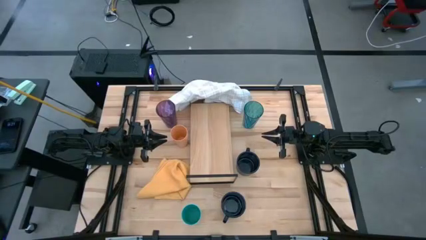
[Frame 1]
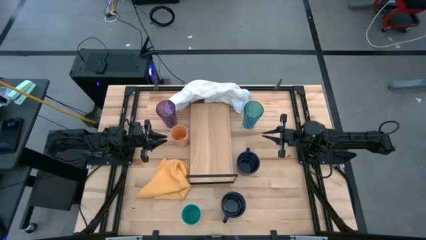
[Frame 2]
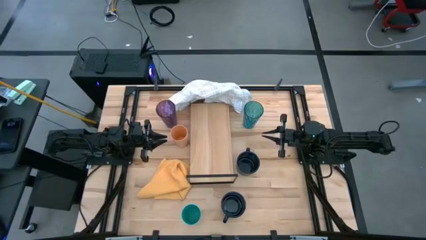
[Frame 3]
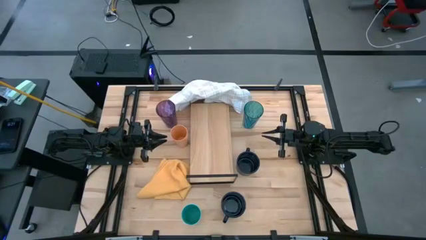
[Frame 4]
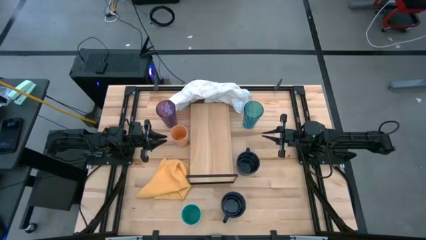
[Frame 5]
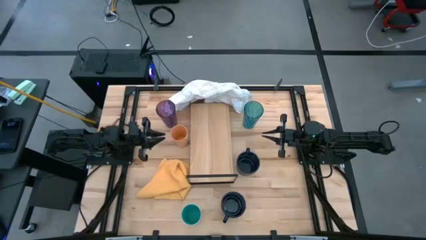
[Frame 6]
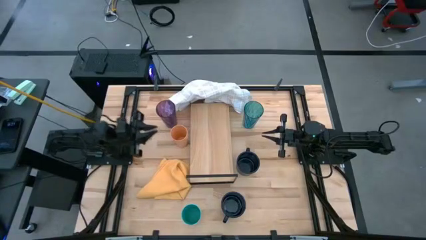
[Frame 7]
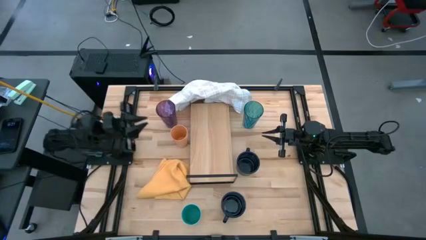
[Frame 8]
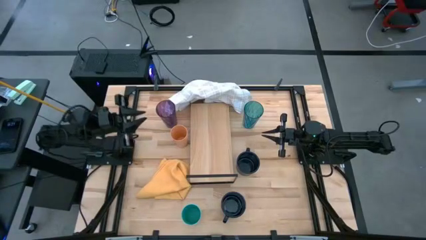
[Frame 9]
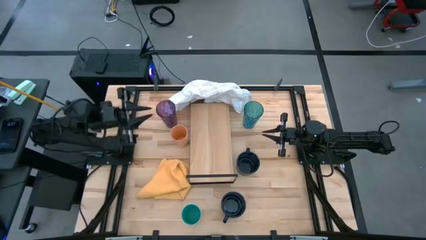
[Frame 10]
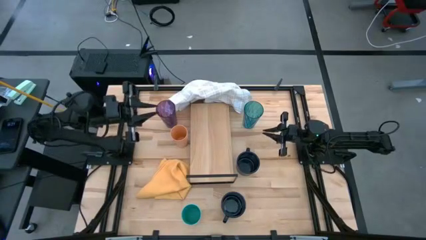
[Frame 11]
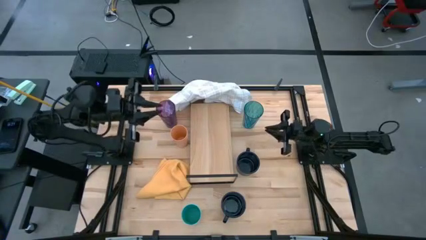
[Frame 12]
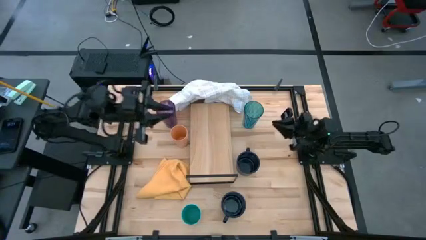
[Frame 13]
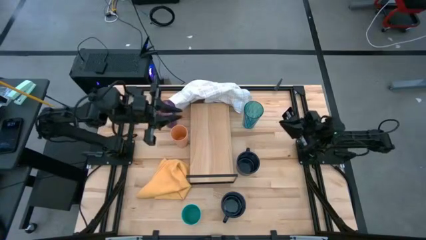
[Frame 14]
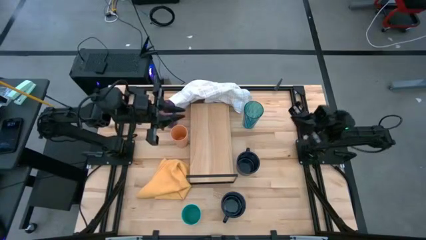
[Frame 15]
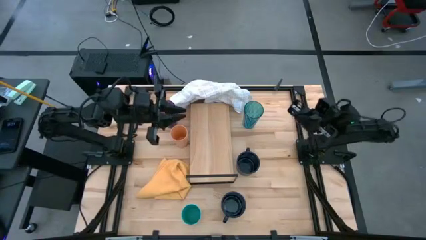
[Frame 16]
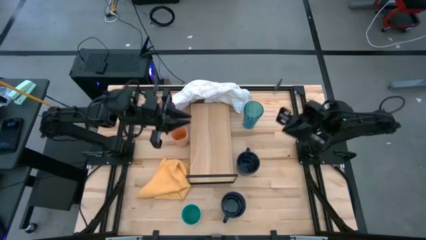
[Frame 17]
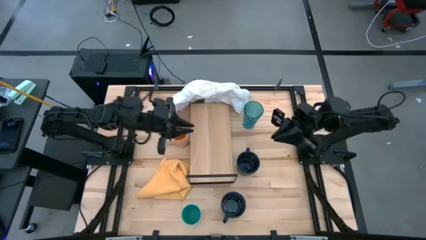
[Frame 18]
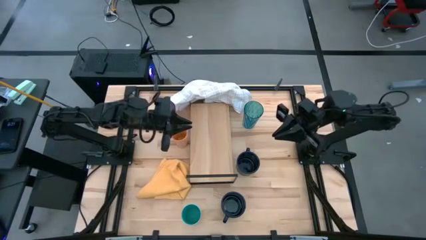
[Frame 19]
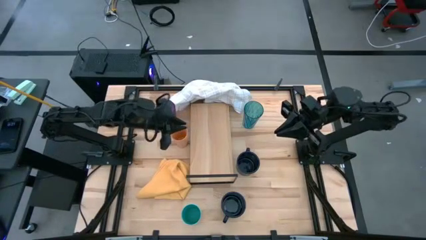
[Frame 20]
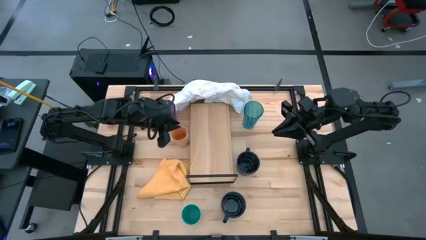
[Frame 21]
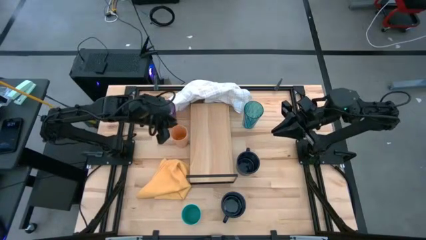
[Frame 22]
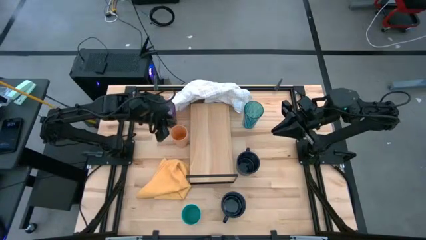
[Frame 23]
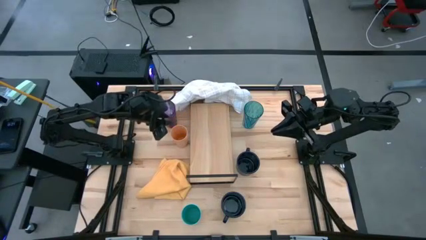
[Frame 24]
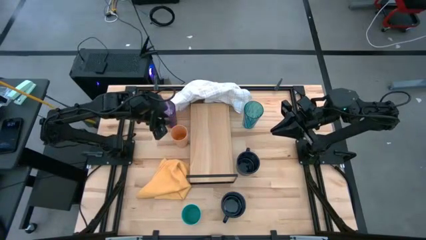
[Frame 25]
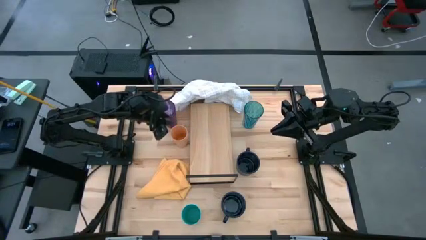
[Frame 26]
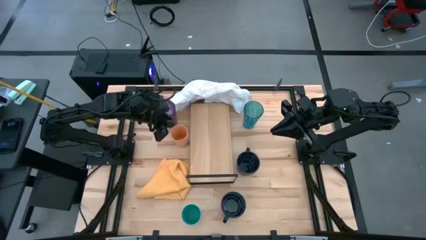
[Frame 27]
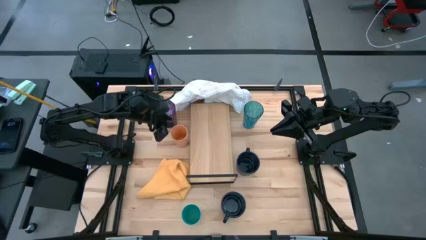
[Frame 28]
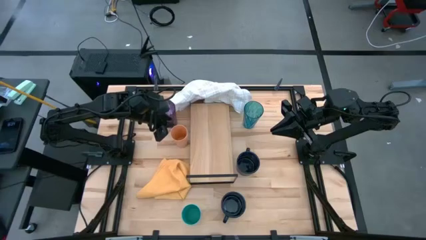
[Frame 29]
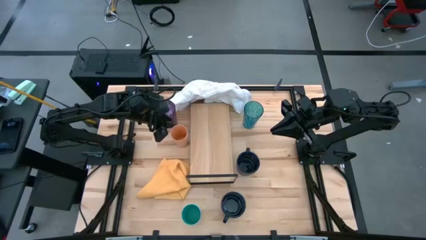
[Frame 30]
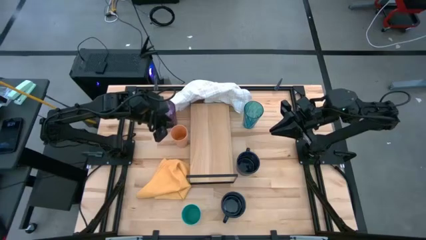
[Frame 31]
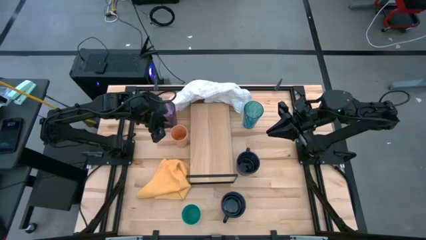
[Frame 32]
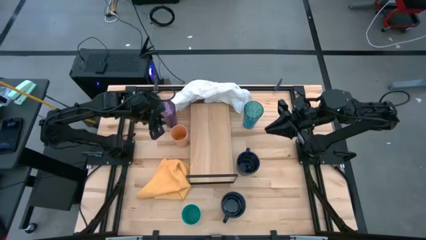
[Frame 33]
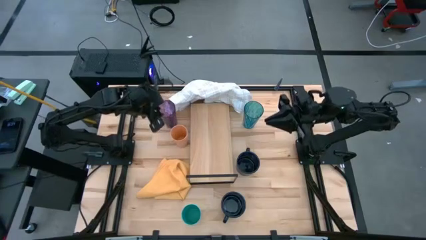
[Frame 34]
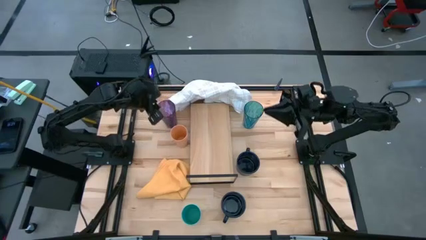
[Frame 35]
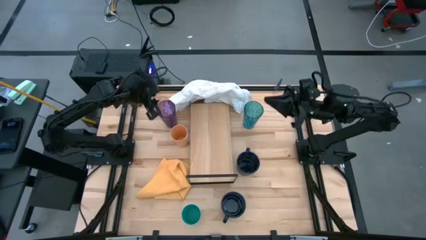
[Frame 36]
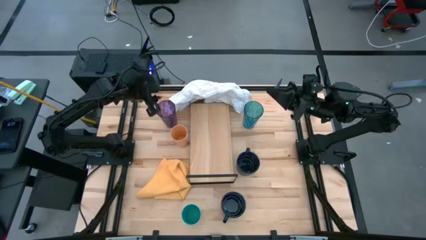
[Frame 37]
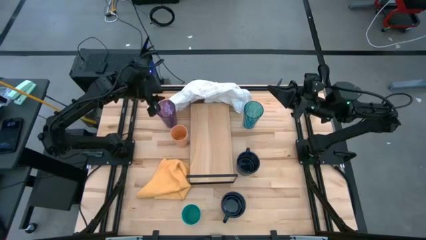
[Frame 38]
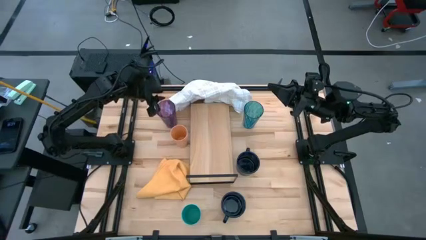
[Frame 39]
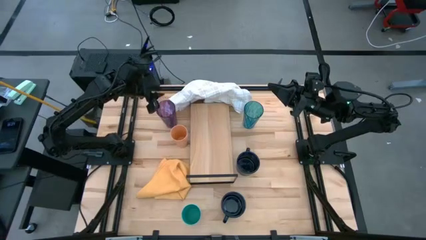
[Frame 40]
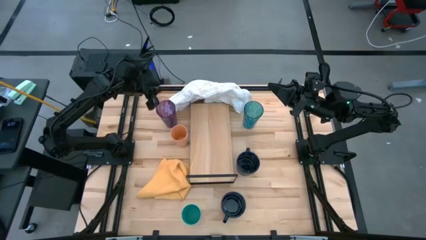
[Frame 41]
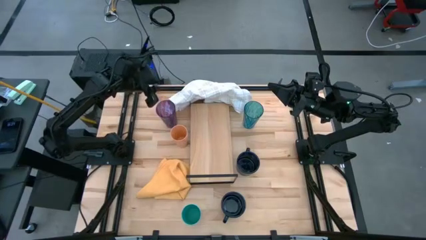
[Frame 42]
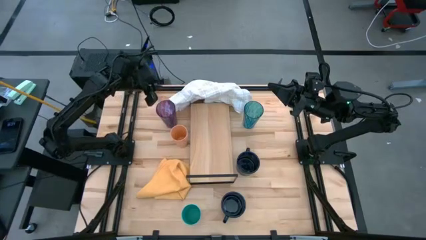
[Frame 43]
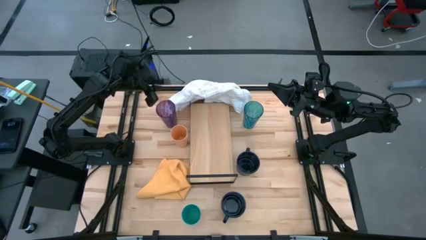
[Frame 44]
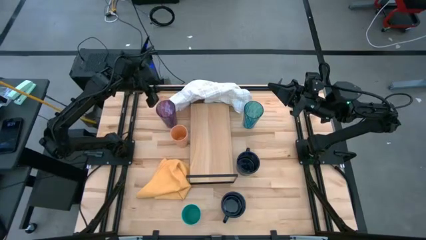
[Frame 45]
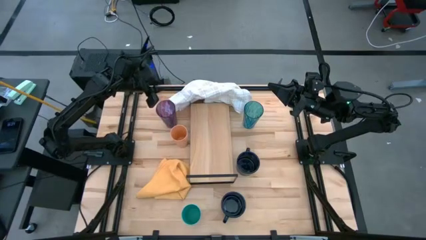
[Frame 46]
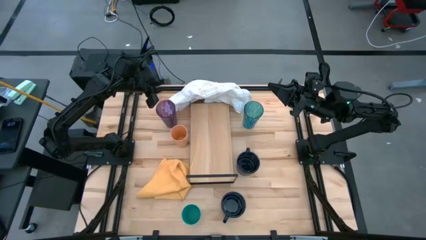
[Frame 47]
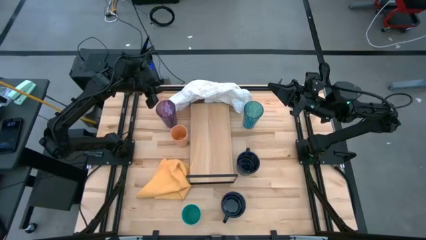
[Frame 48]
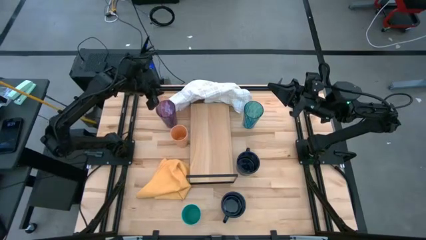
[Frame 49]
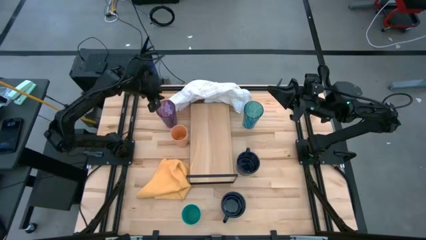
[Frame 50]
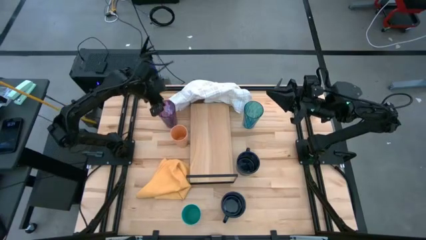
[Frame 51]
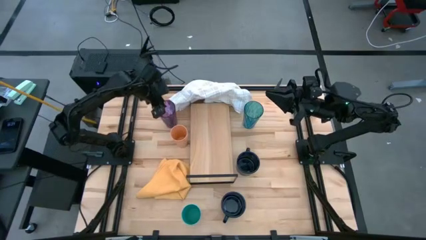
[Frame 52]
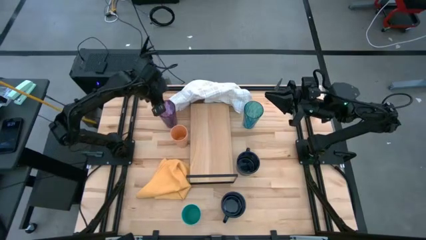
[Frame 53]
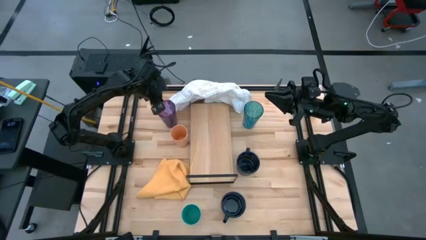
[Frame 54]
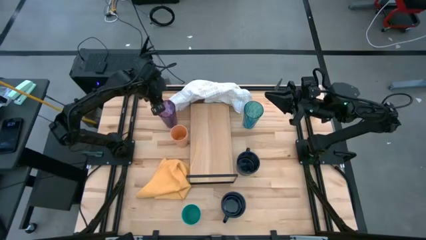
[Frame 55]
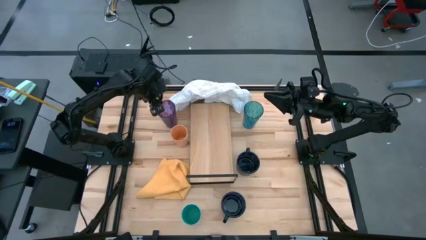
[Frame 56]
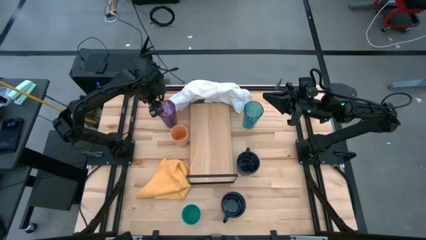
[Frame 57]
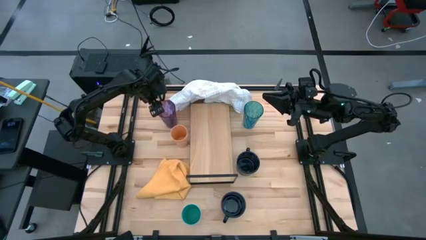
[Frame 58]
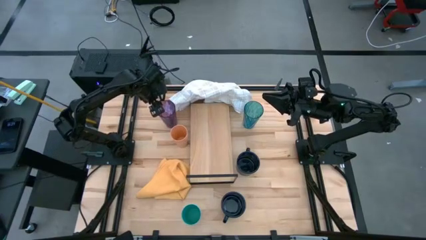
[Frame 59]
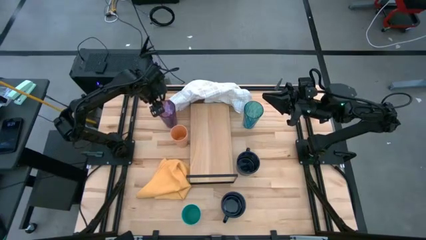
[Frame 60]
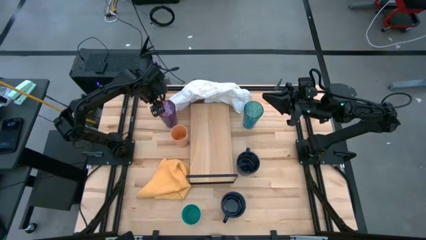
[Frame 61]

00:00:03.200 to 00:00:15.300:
Task: Stack small to large cups/mugs on shelf
Put the purple cup on the shelf
